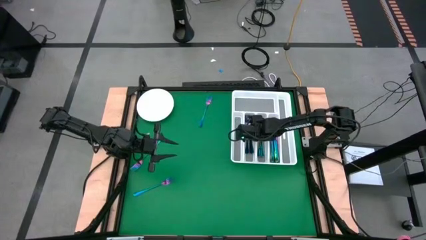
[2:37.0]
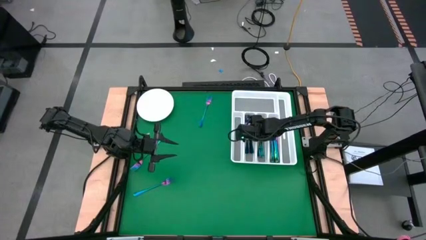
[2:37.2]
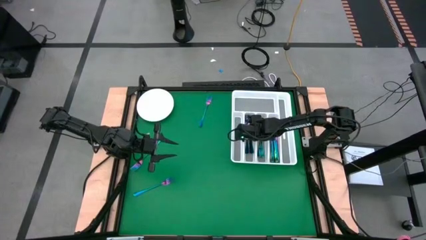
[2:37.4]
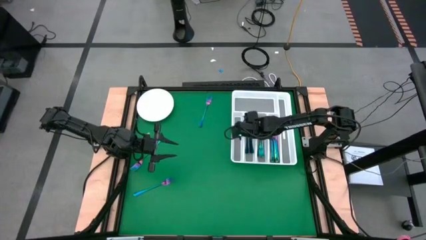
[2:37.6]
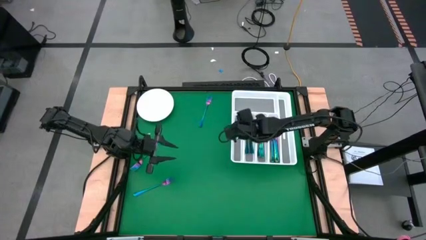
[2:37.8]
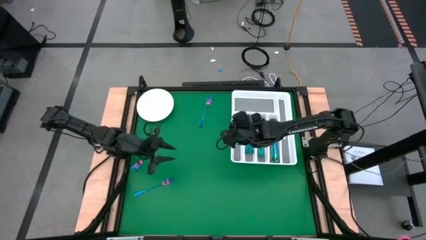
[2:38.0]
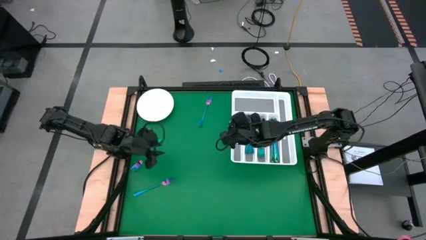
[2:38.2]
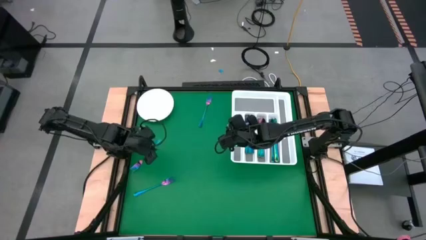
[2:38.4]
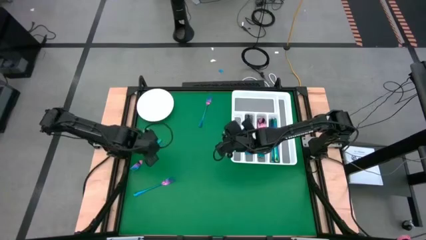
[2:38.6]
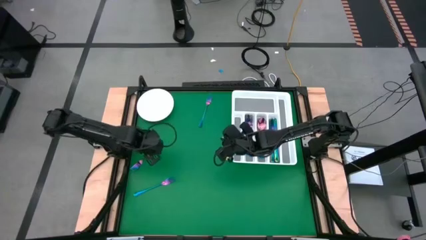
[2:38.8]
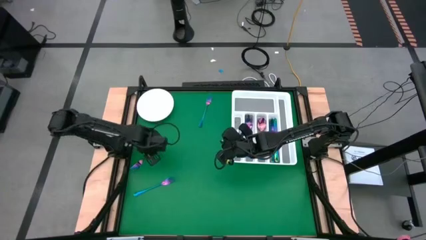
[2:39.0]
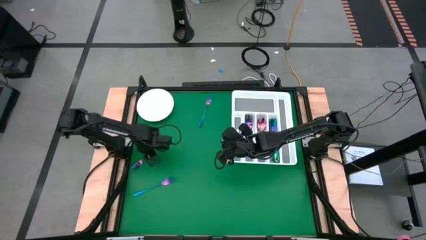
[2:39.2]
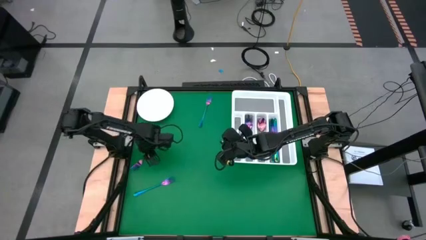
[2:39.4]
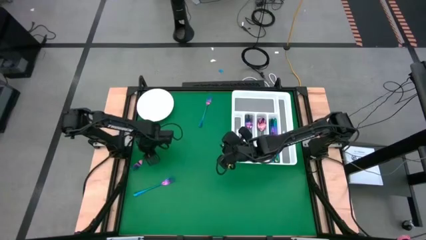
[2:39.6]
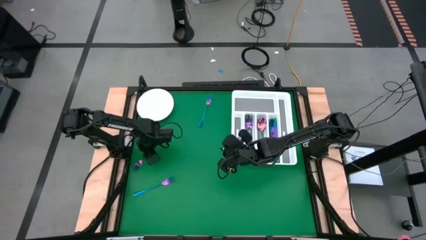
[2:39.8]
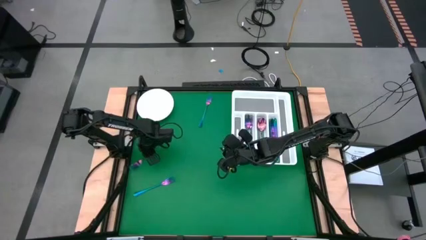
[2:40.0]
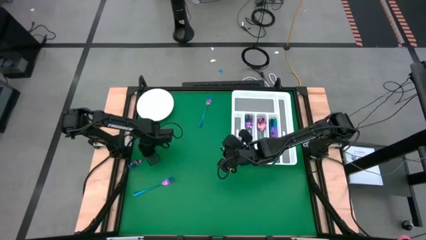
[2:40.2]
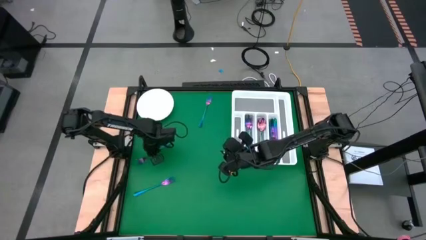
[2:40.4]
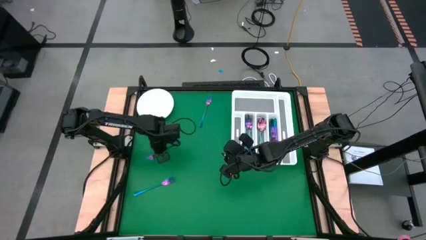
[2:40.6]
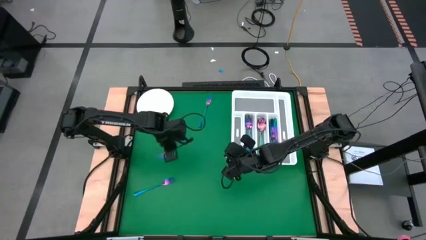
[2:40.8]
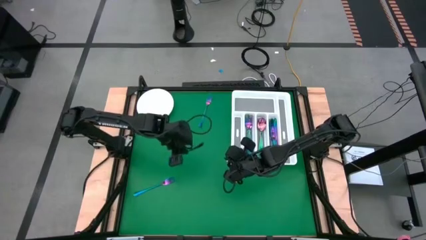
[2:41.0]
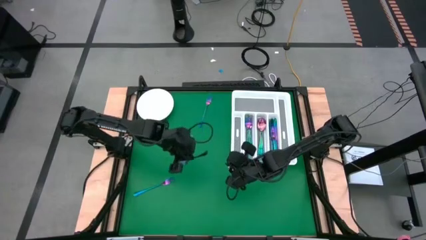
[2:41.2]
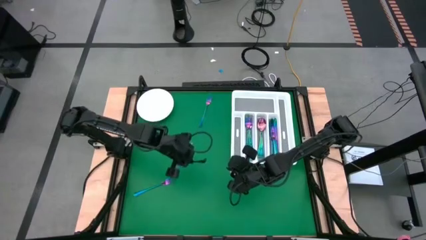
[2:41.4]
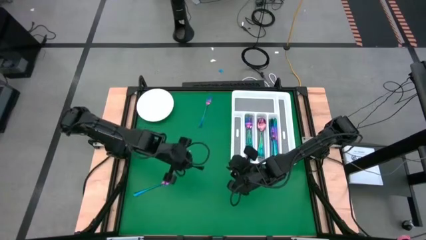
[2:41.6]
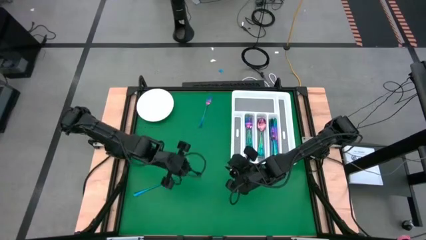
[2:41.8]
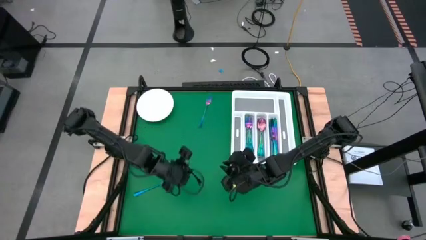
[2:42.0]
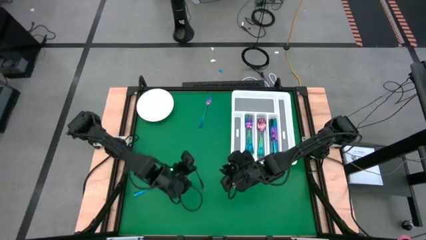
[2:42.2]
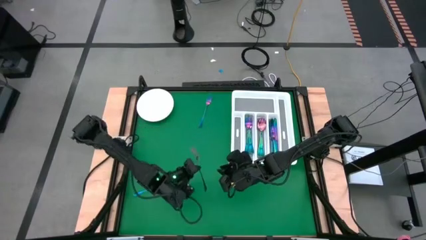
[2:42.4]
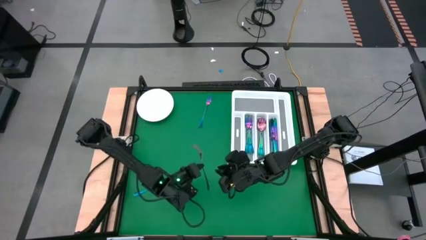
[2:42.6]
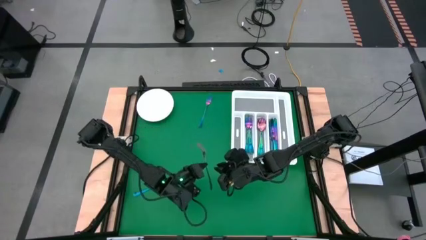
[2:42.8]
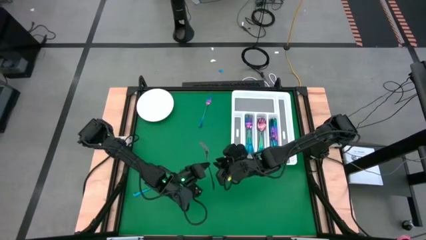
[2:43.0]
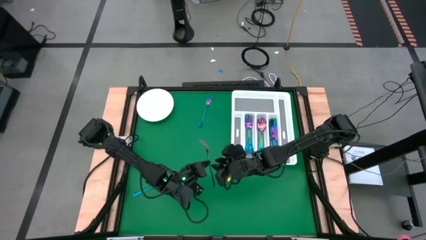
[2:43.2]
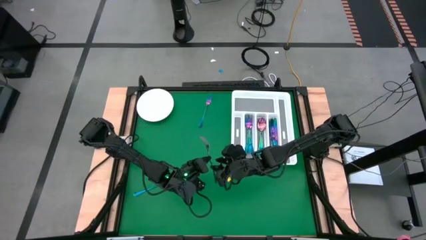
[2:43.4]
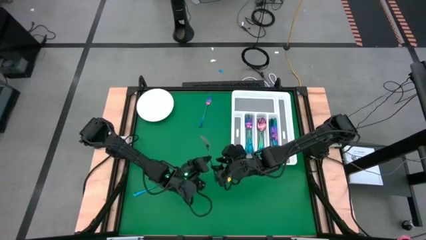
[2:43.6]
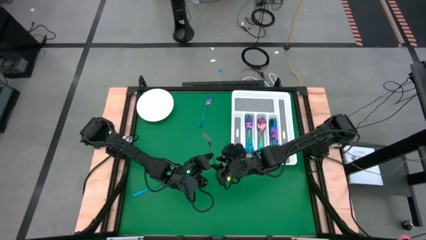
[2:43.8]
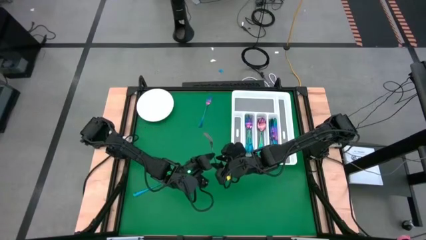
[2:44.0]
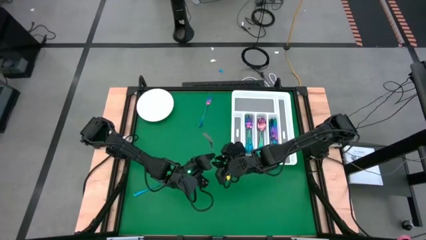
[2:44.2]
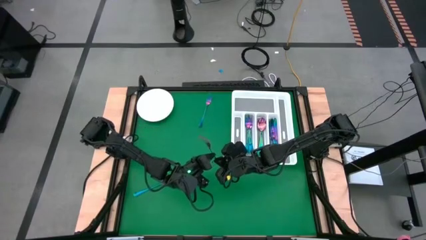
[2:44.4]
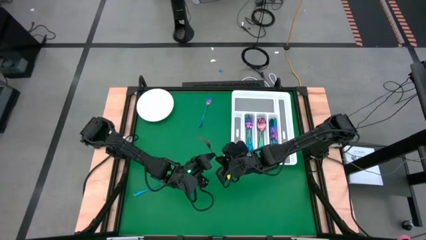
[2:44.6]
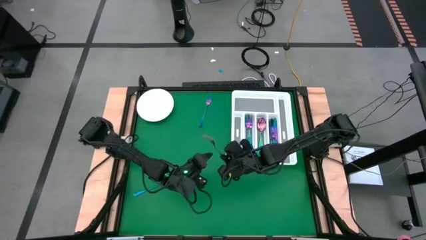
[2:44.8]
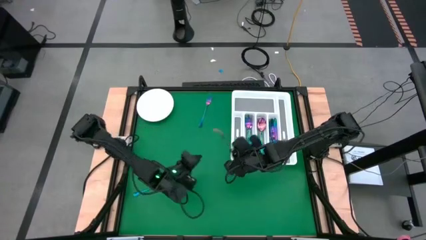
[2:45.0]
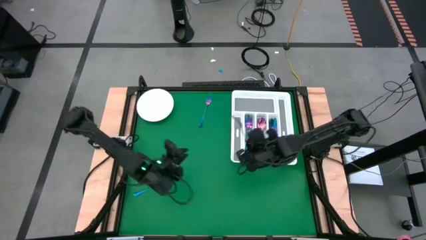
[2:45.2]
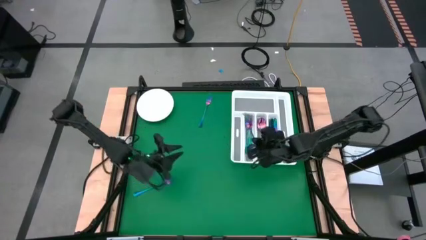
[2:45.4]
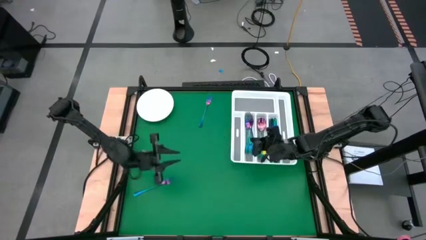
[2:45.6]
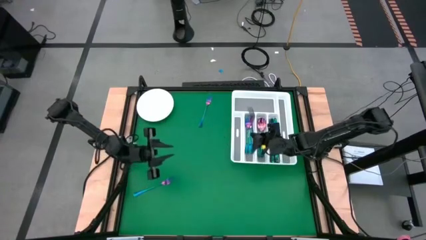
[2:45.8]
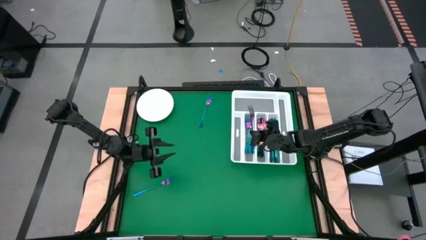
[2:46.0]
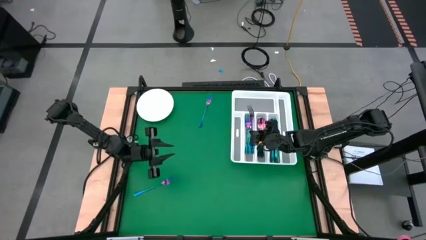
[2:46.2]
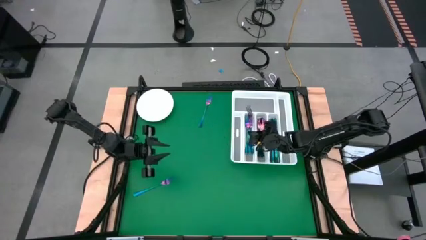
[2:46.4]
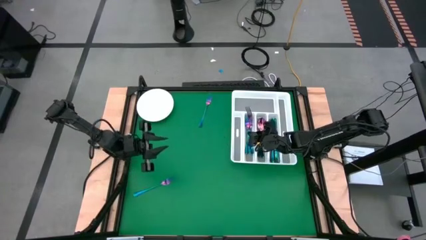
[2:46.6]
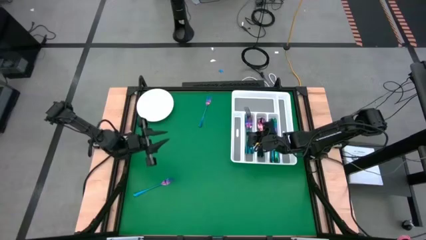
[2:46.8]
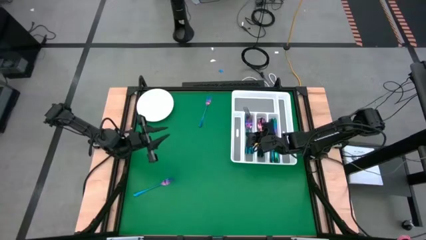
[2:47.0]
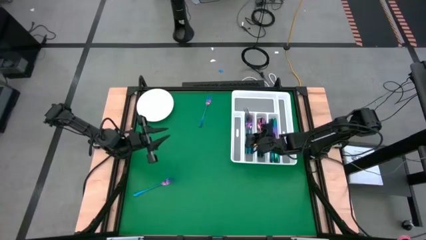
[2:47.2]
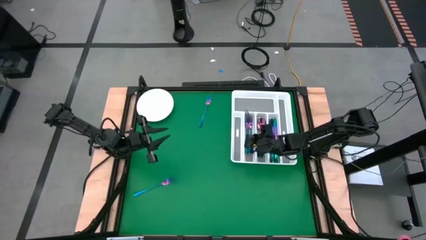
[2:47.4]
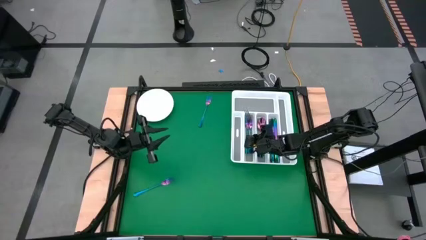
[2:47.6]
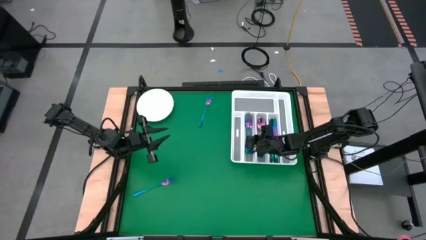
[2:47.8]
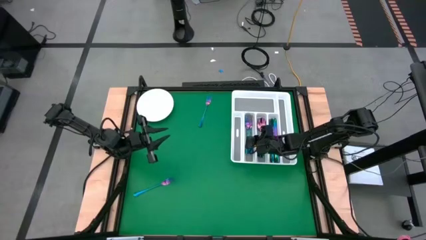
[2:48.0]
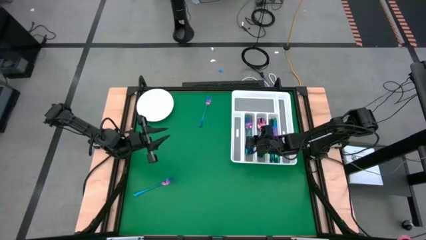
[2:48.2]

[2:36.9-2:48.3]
Task: Sort silverware
Put the blue fork into the white cutlery tray

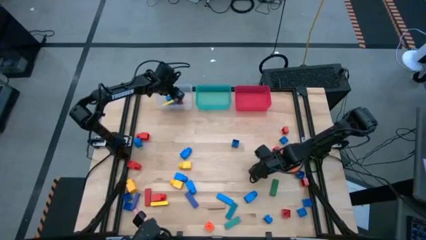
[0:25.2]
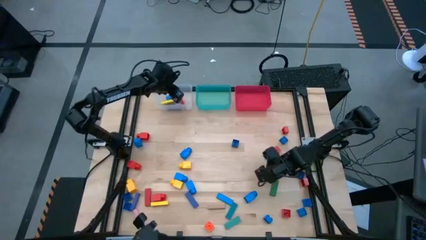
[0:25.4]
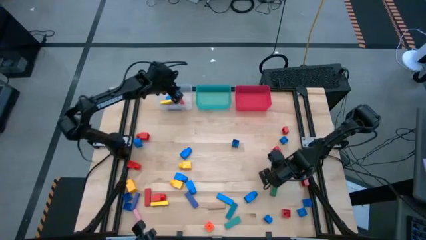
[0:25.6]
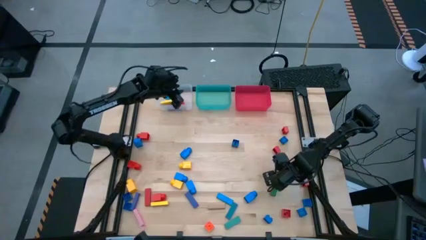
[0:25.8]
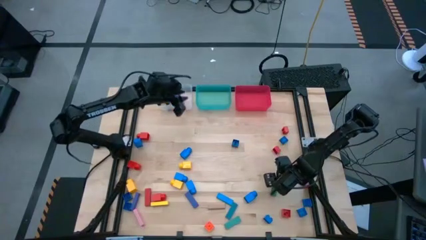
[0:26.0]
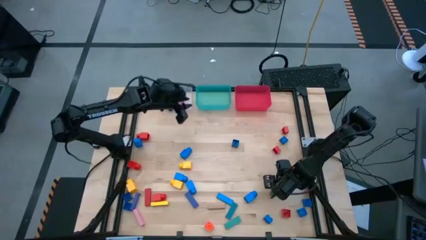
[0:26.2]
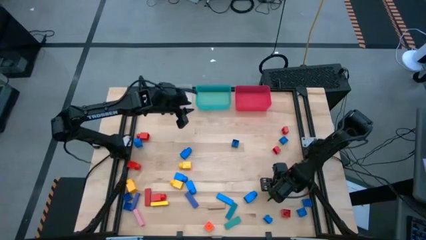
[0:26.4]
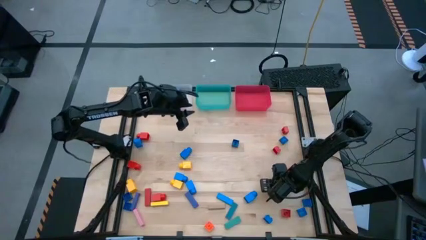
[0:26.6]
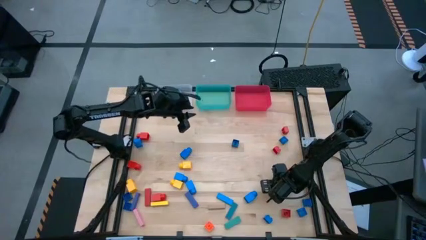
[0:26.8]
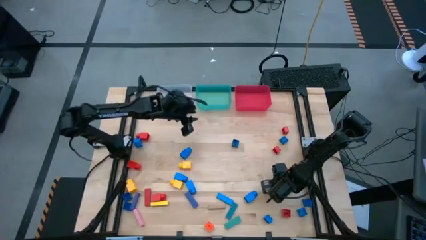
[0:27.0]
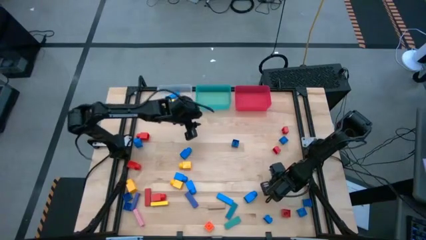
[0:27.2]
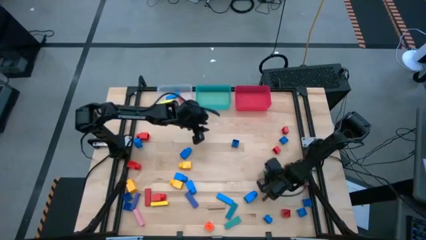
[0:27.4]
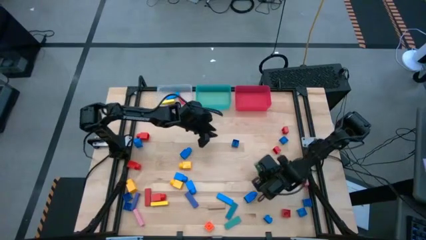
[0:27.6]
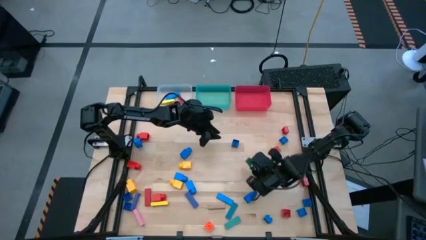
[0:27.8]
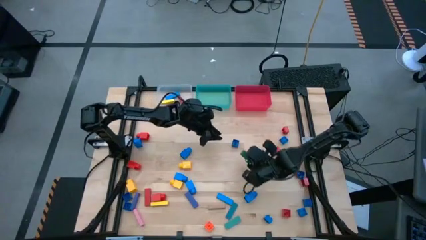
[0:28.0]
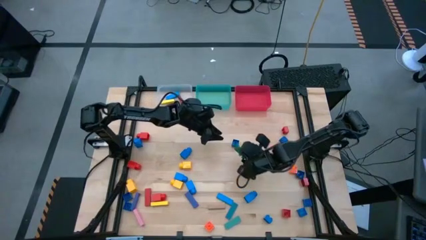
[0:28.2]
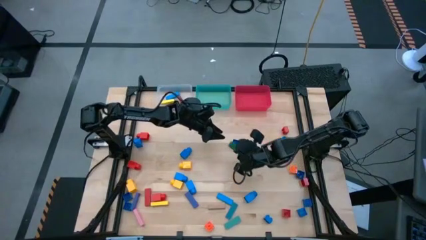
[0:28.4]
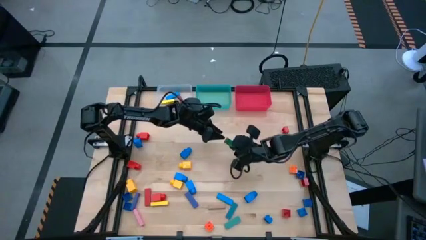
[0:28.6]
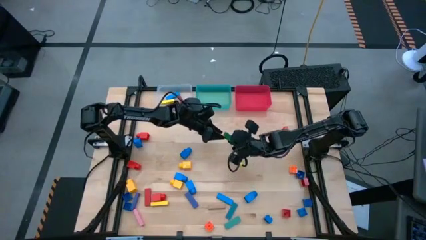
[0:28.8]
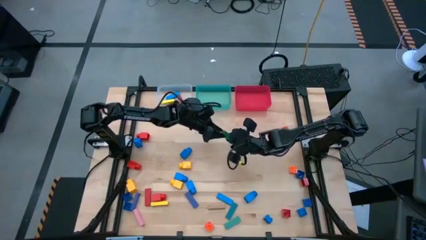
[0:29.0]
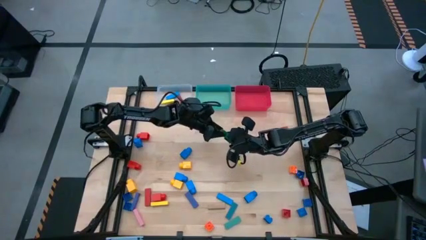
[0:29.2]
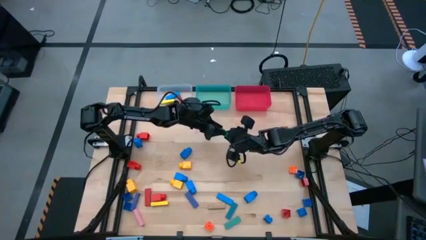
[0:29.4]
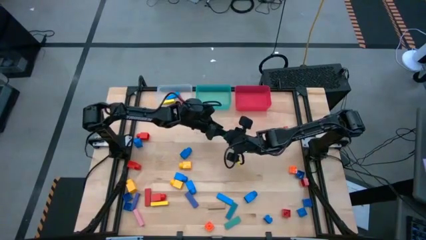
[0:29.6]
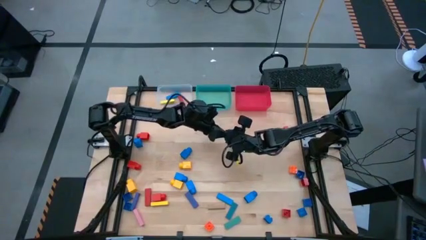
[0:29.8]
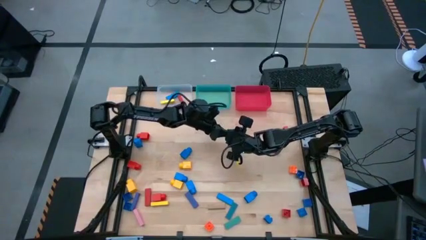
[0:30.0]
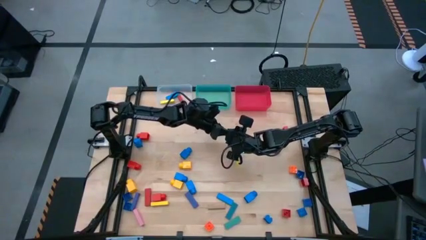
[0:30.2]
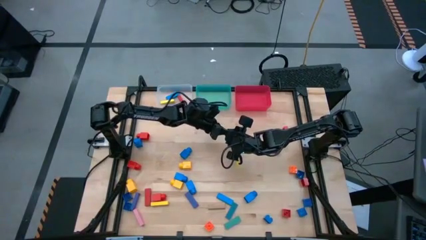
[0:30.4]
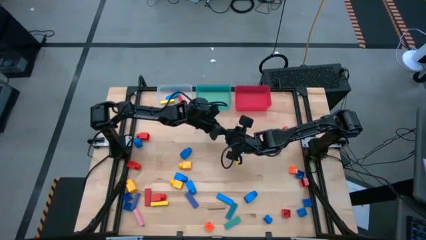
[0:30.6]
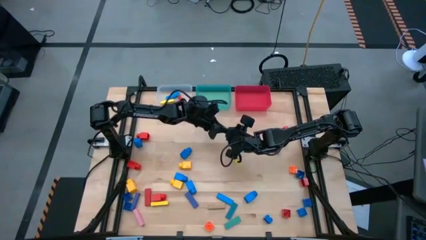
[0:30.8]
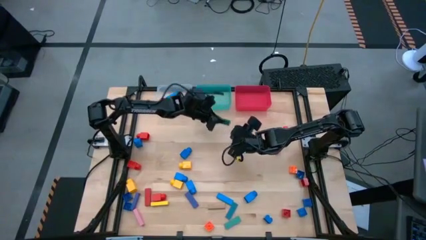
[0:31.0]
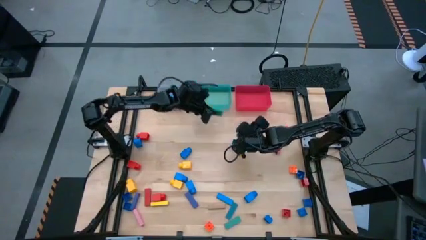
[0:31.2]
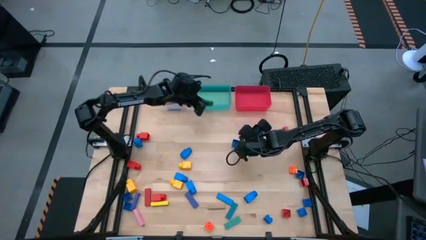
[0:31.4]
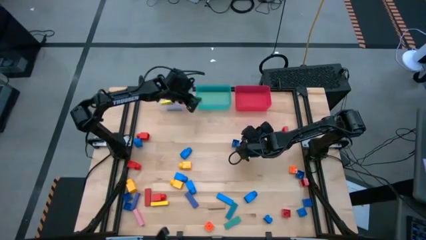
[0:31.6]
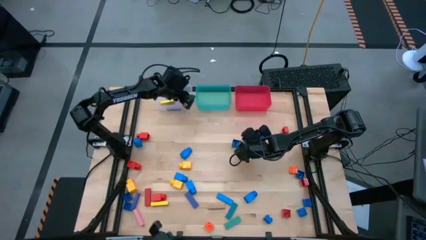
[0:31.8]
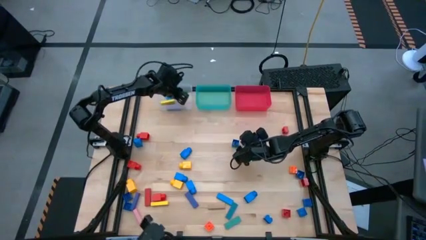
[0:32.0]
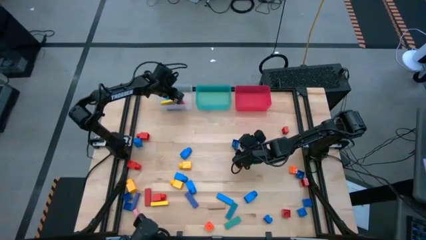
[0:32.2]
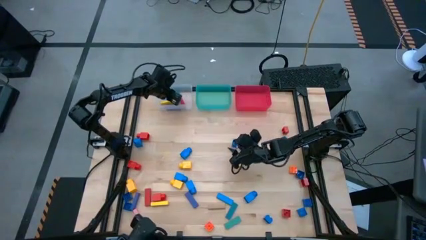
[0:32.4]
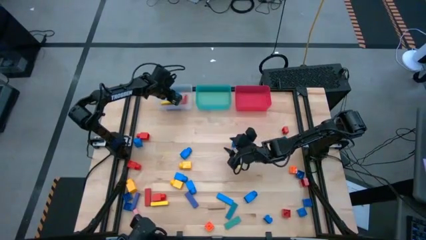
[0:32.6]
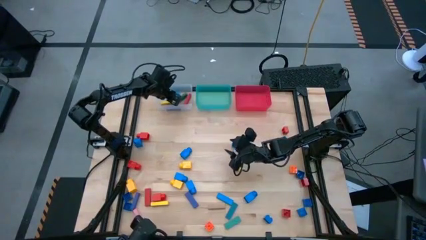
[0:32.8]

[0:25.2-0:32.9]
Task: Sort blocks by size
Put the green block into the transparent bin
